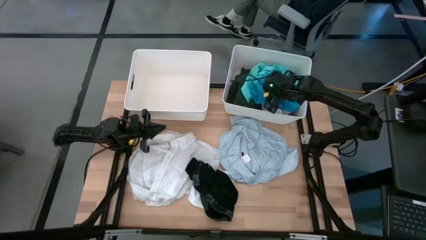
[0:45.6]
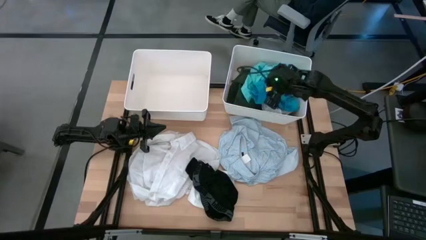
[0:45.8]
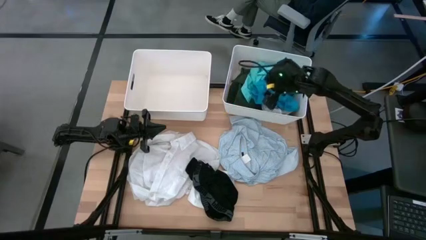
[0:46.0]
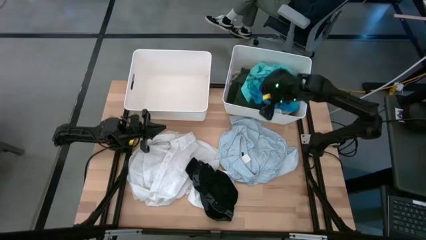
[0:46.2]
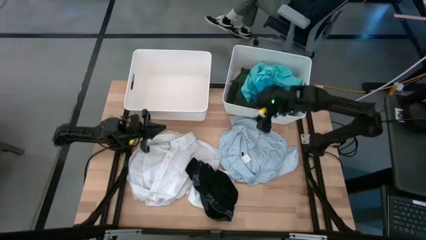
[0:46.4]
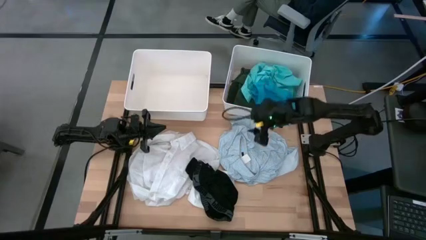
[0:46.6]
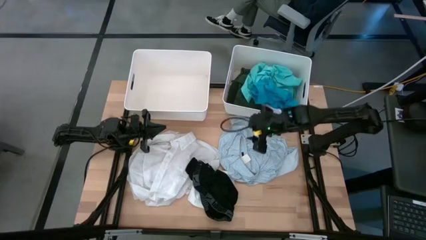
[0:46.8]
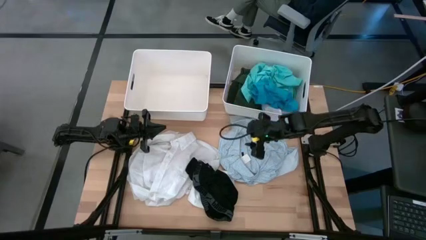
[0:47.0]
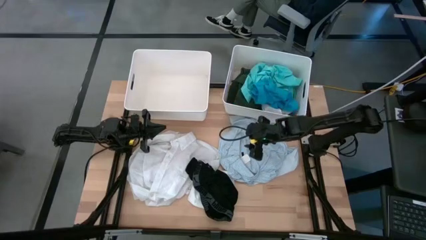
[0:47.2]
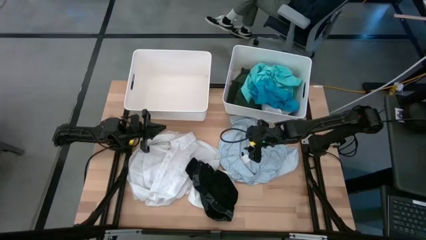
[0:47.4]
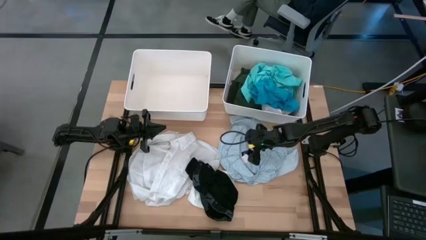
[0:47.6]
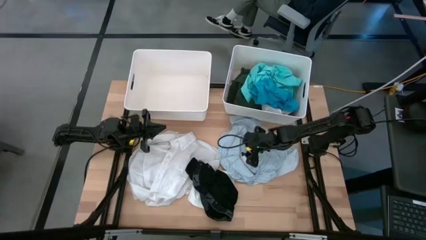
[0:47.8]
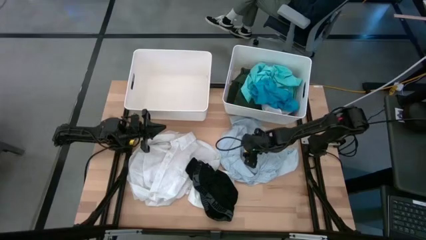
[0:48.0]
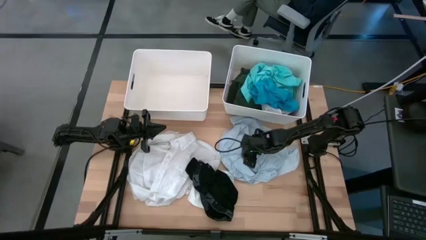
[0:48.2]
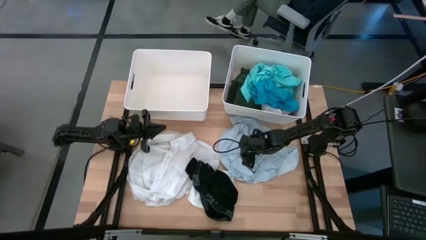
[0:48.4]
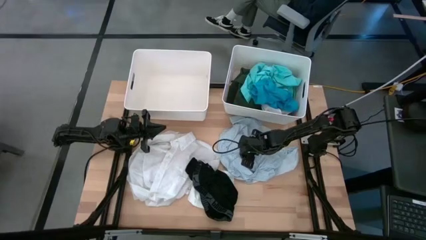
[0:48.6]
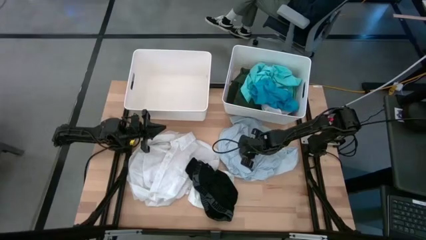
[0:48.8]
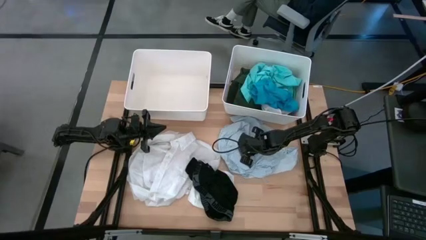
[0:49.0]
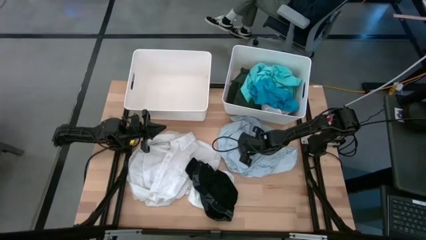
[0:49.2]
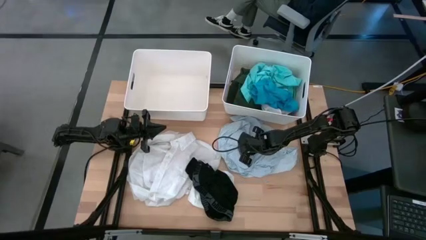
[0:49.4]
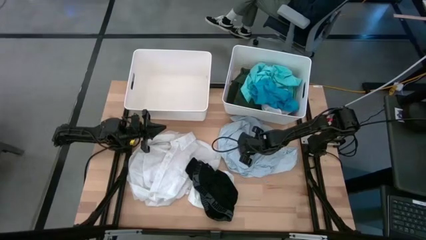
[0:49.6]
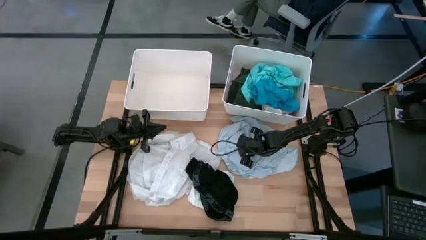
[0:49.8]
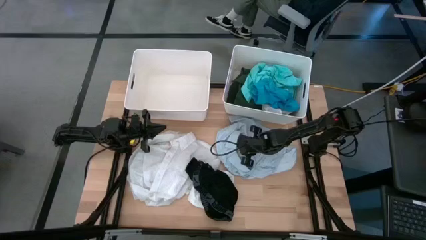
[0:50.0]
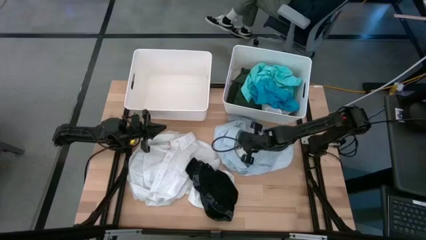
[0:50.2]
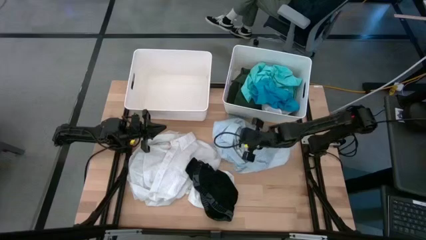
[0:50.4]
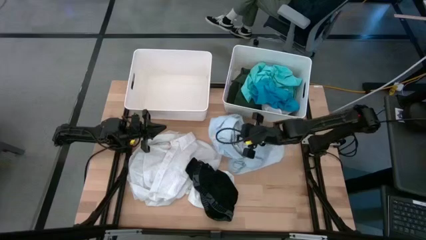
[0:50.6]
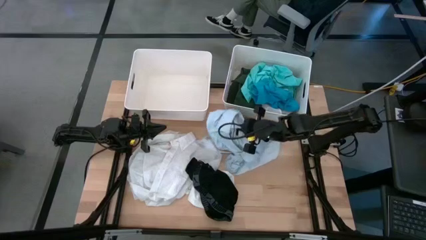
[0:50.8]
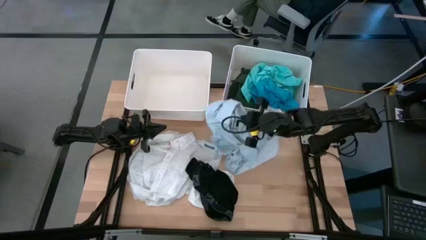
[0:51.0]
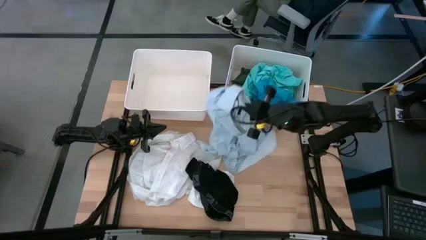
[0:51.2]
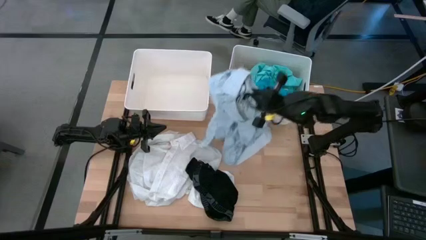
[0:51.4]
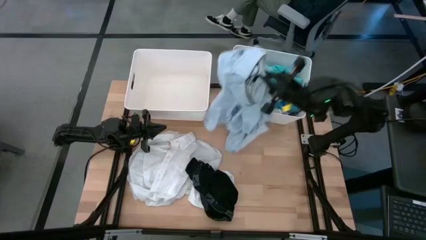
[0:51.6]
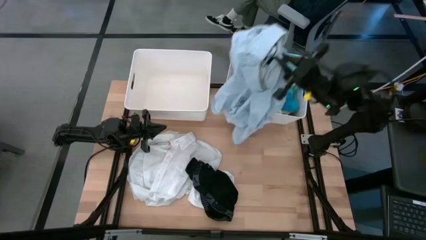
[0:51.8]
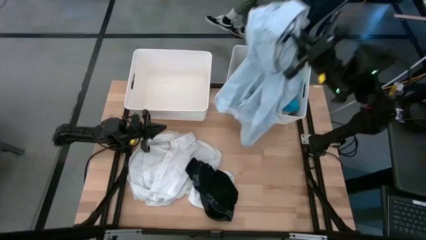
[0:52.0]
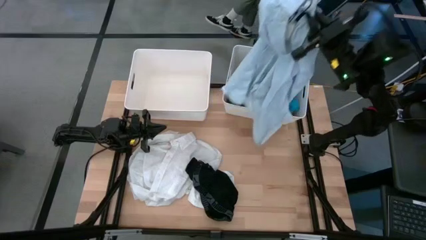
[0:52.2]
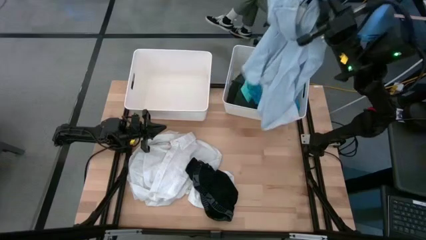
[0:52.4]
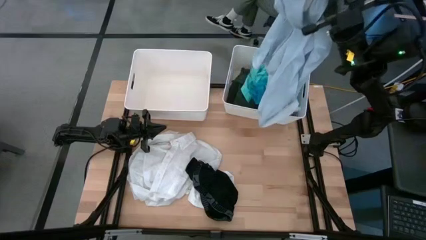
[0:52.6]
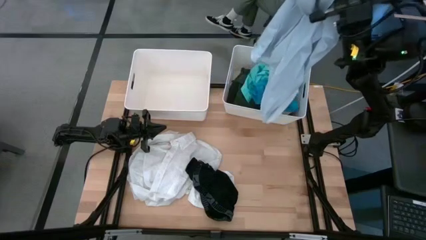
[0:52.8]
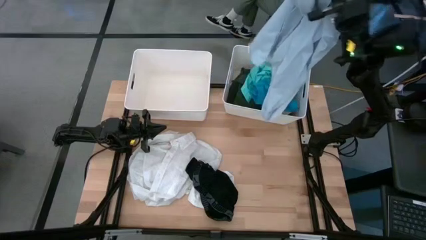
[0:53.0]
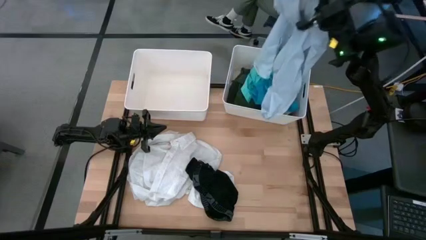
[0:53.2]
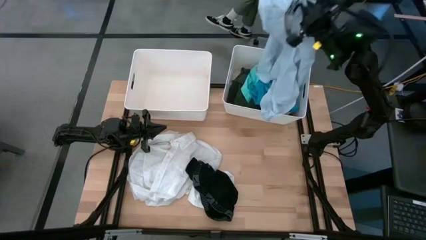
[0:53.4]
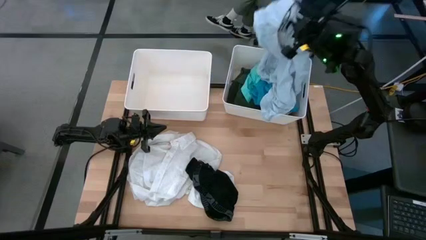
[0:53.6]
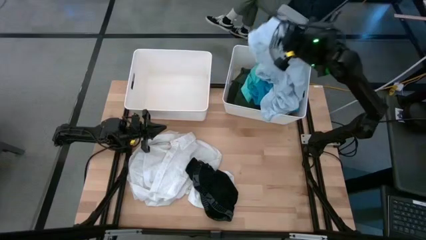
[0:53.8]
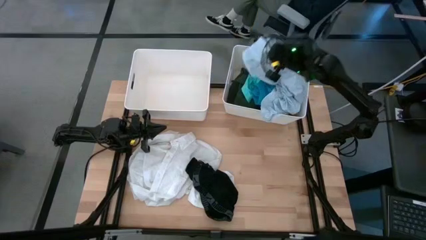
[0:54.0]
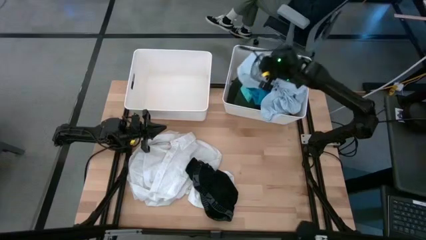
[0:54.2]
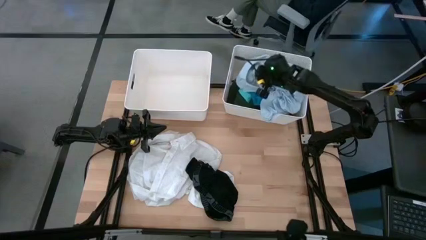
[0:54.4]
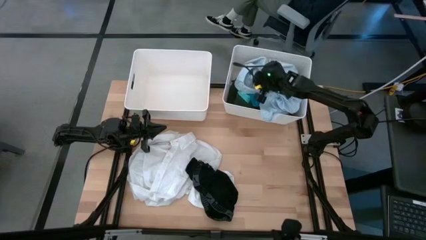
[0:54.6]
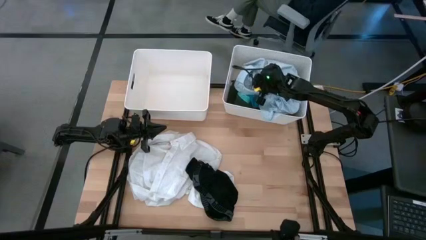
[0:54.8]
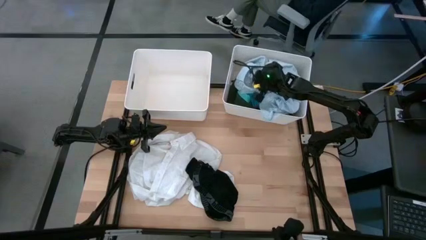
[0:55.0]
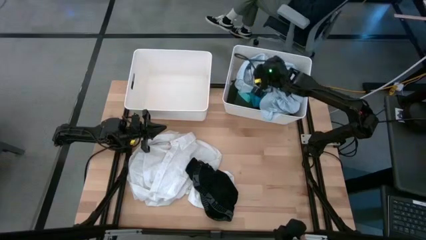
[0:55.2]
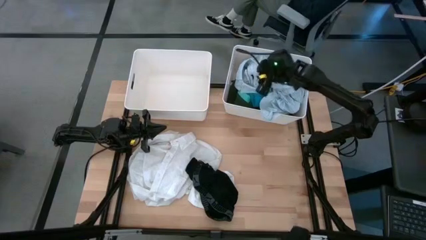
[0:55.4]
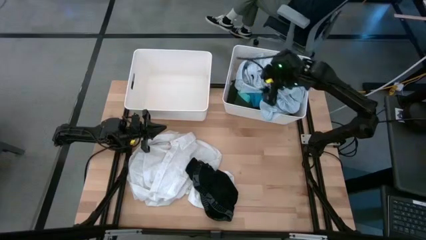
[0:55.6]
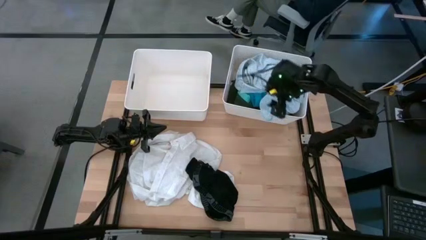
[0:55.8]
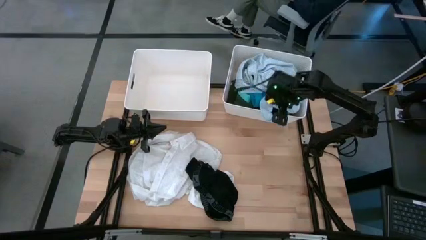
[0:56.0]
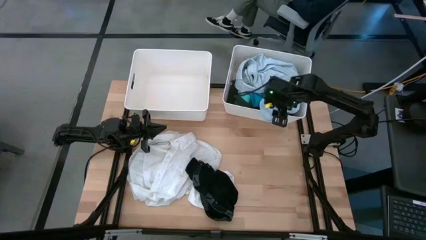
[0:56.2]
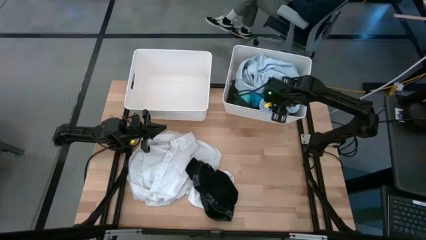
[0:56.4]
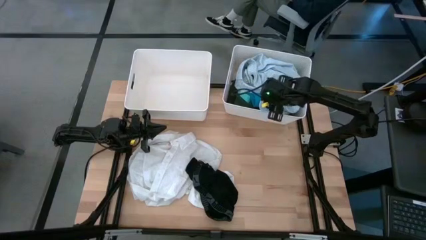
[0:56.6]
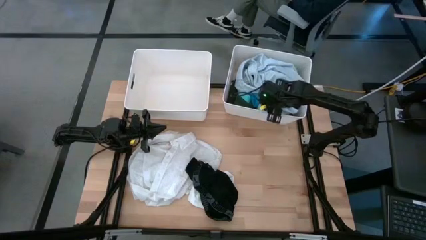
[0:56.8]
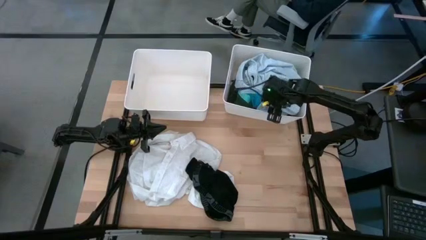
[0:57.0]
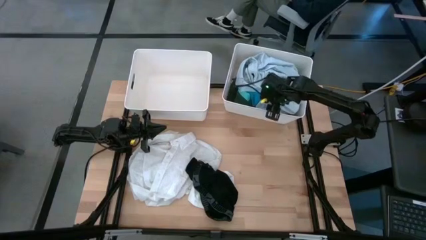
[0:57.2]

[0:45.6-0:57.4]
Task: Sort clothes
Put the light blue polo shirt into the right white bin

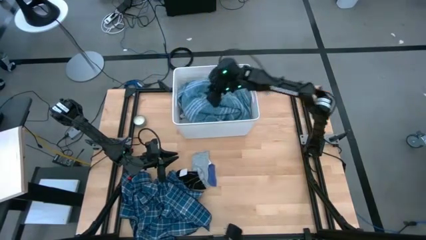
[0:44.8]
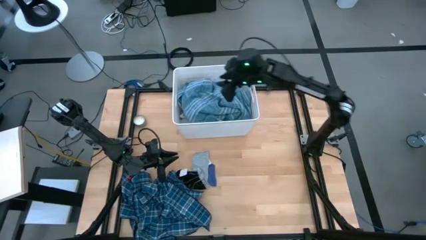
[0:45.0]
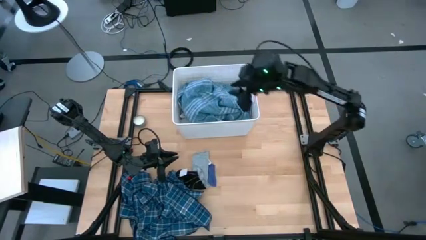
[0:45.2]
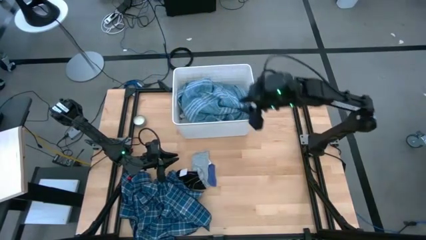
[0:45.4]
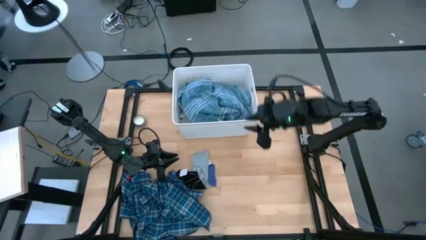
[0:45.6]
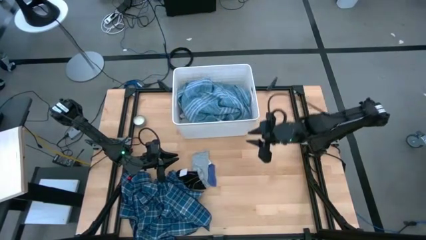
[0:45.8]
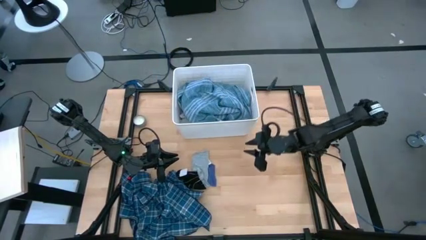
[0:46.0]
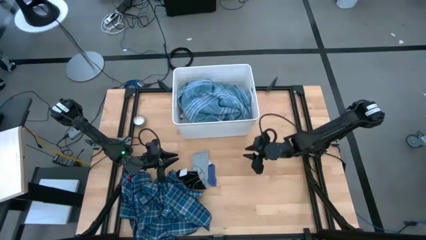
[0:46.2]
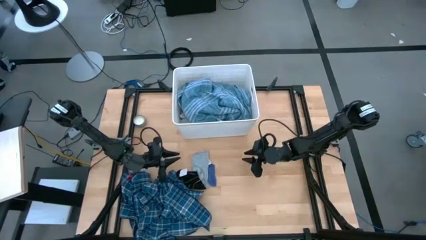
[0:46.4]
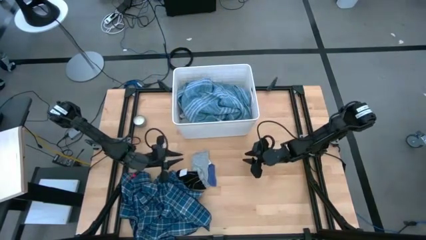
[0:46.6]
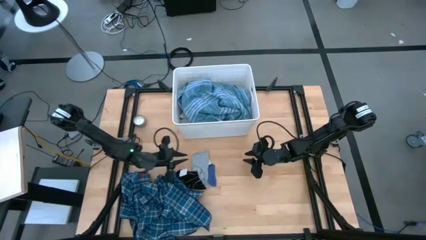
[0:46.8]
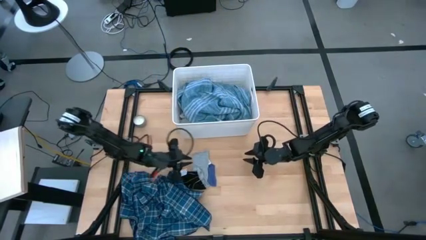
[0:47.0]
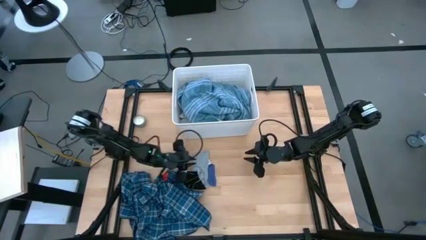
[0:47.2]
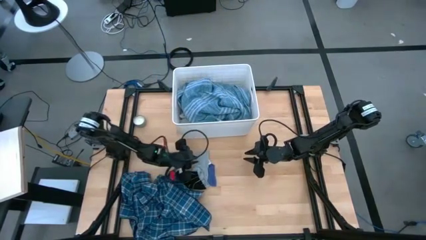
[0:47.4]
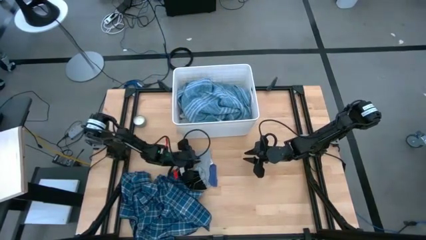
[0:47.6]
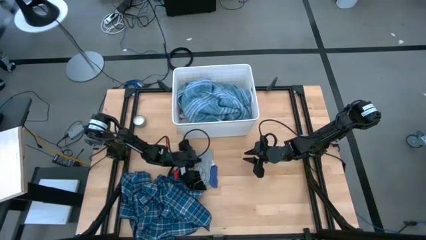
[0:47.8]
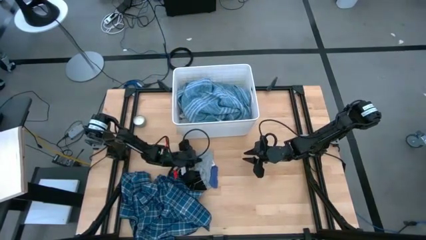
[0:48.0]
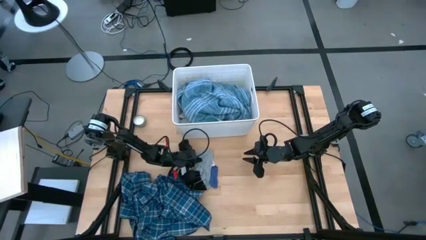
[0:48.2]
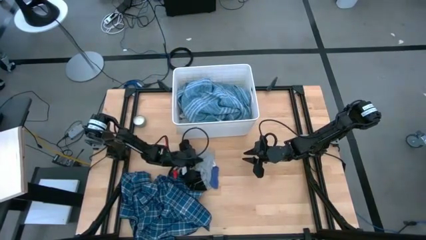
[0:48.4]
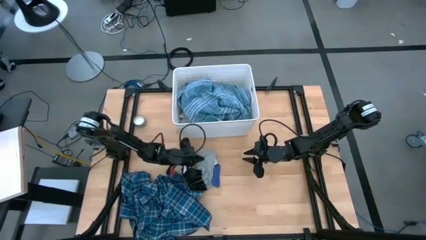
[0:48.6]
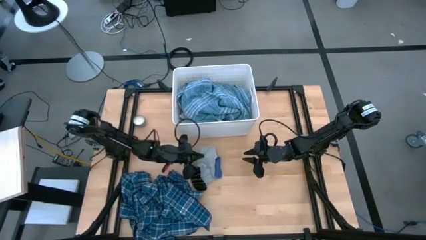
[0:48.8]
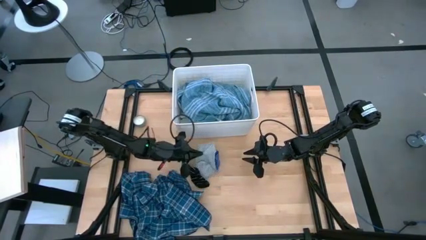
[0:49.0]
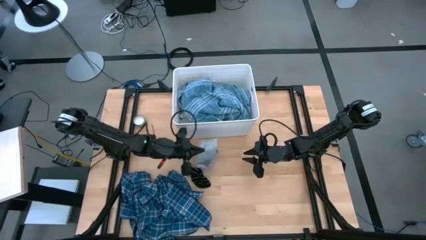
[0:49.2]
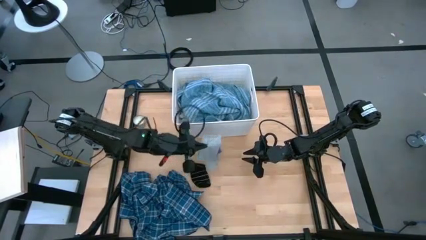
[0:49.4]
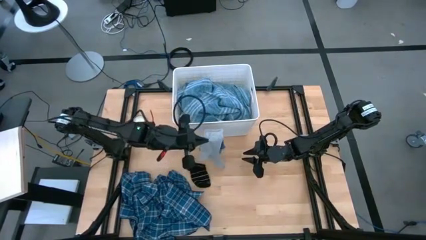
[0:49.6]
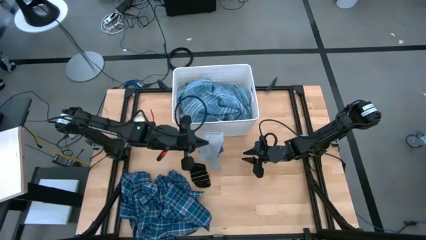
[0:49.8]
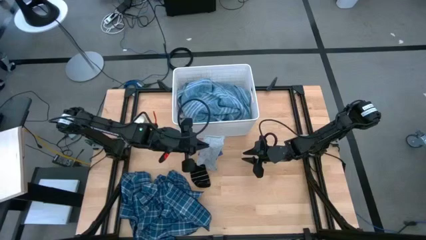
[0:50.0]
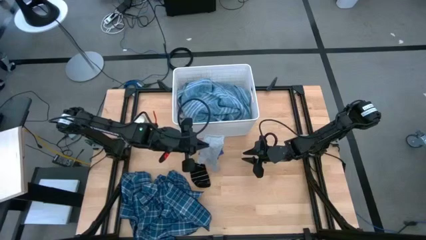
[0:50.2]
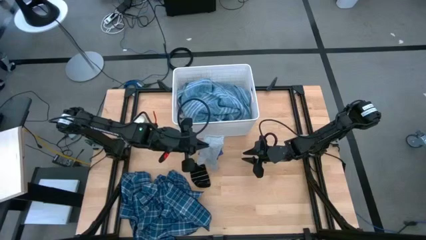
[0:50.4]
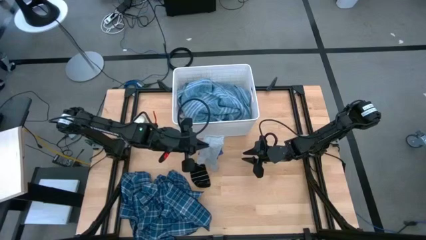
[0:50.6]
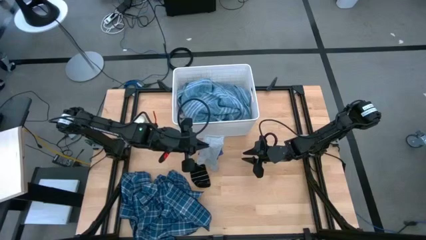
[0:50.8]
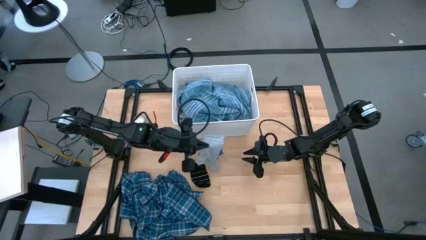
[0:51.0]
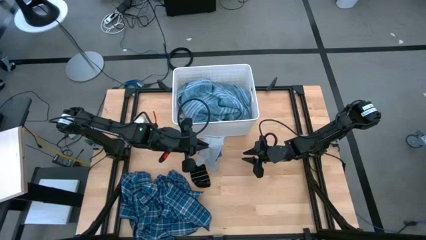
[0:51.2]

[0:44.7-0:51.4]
Task: Sort clothes
Put the gray sock into the white bin
